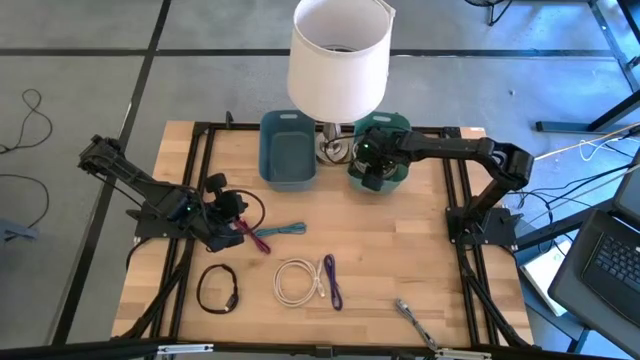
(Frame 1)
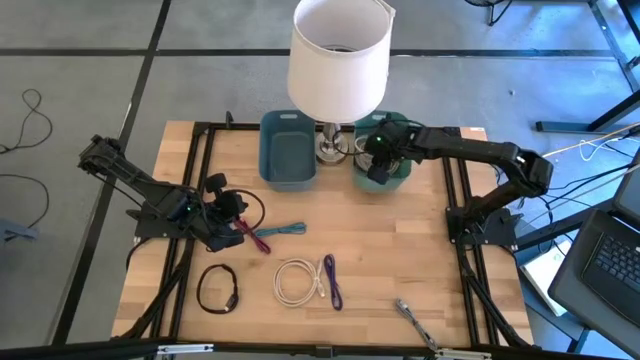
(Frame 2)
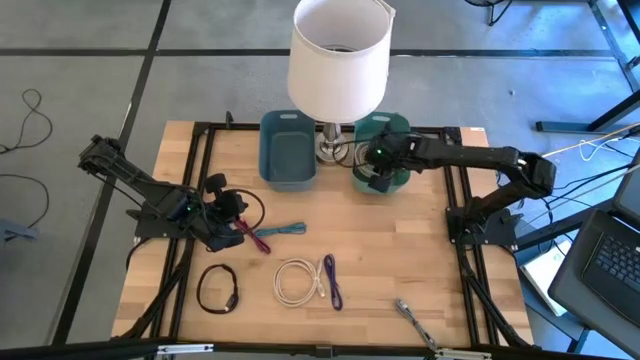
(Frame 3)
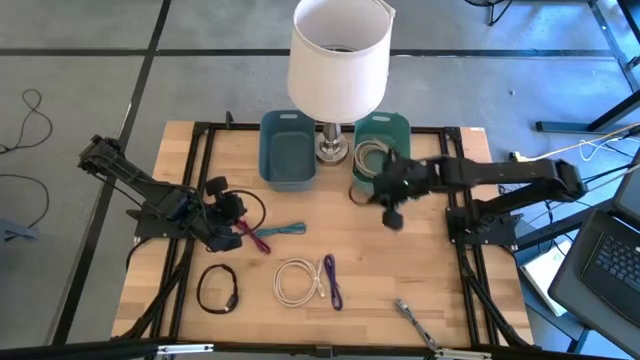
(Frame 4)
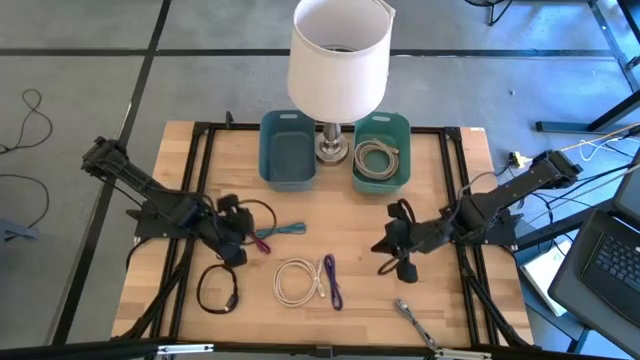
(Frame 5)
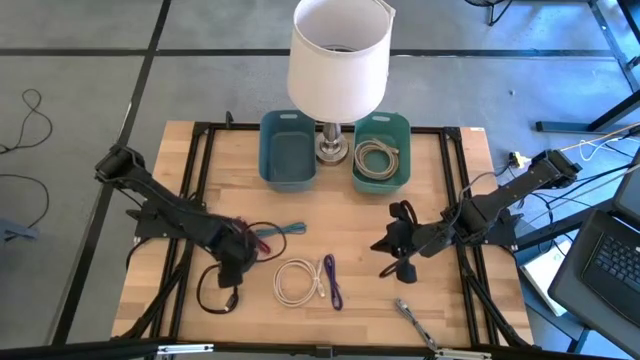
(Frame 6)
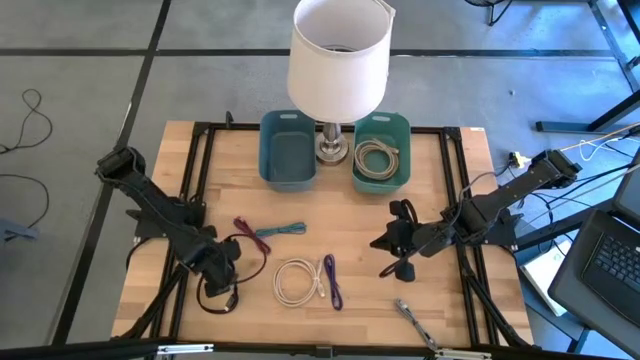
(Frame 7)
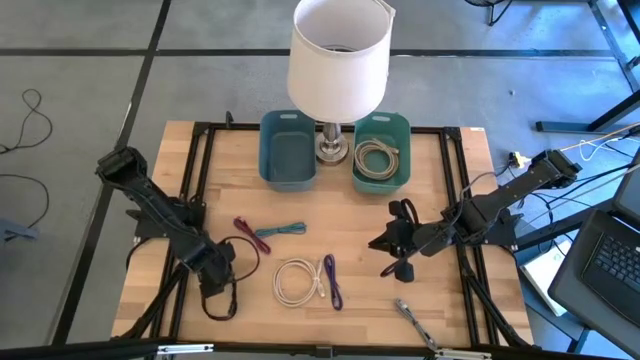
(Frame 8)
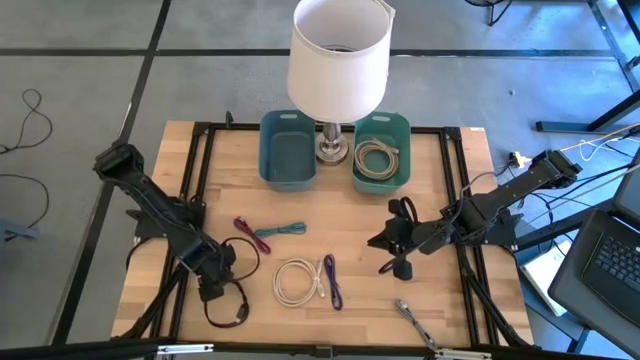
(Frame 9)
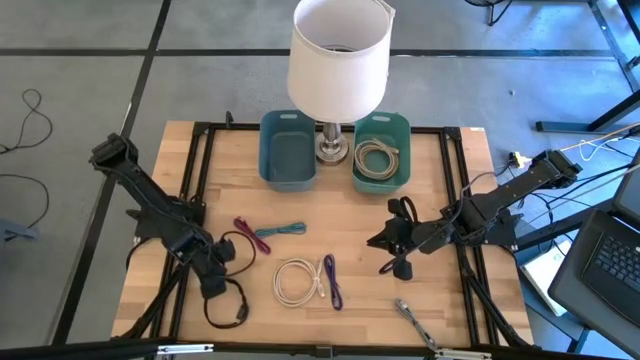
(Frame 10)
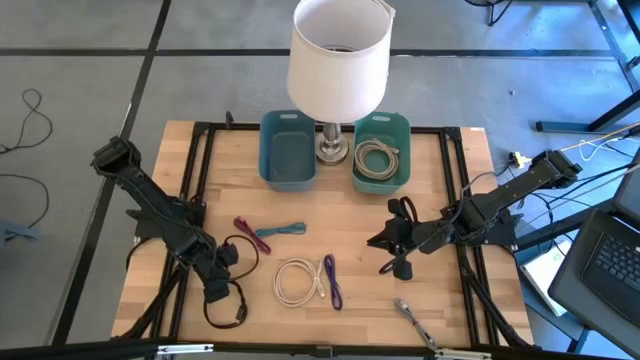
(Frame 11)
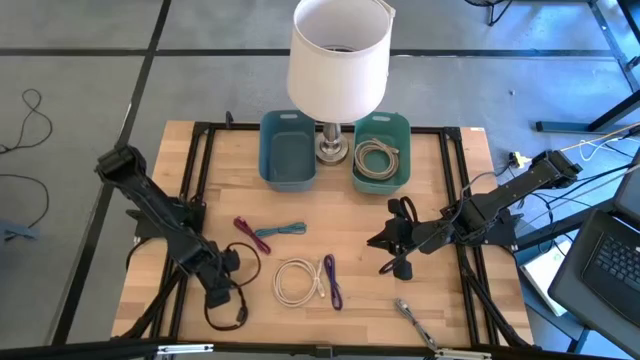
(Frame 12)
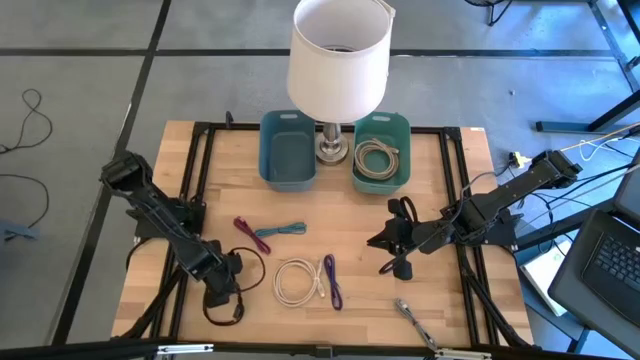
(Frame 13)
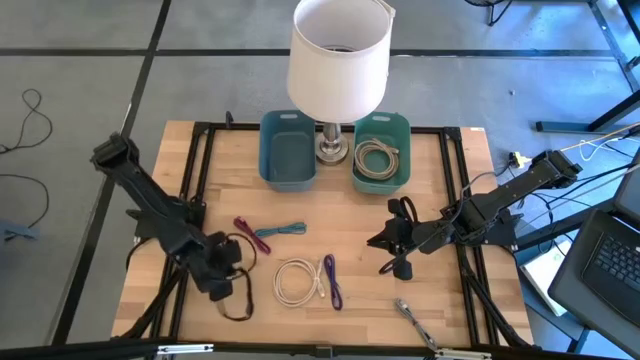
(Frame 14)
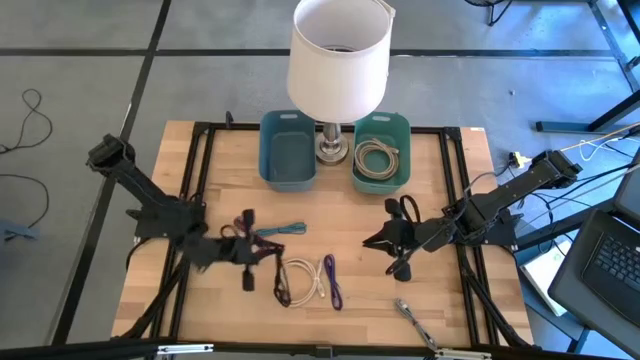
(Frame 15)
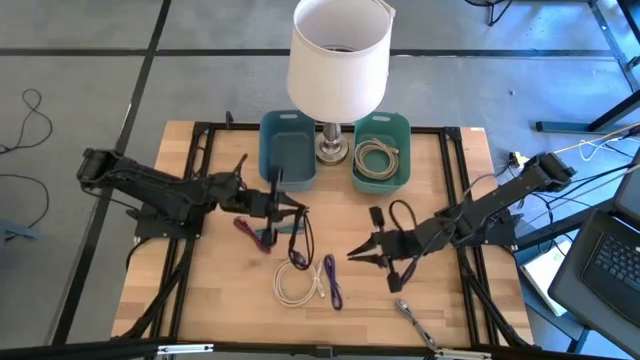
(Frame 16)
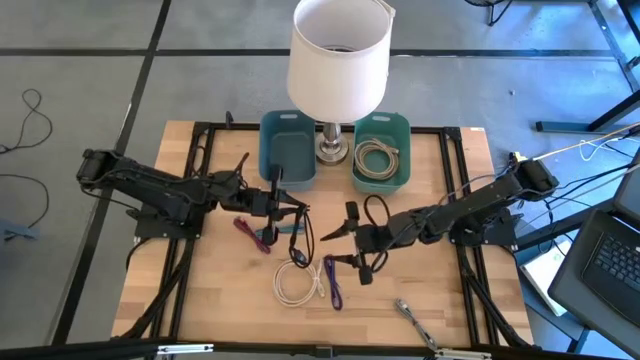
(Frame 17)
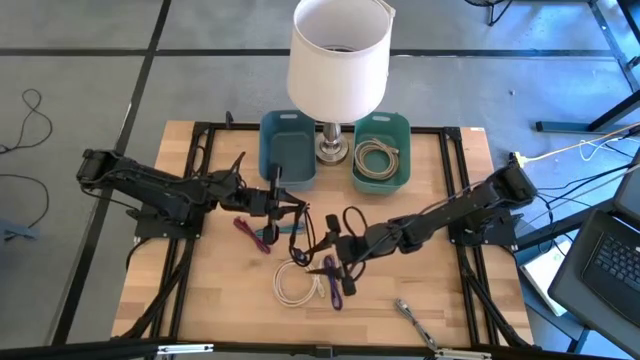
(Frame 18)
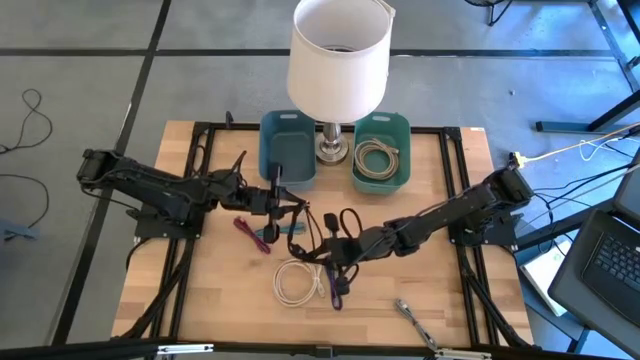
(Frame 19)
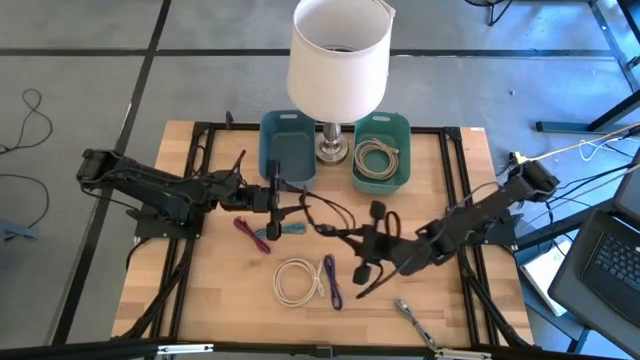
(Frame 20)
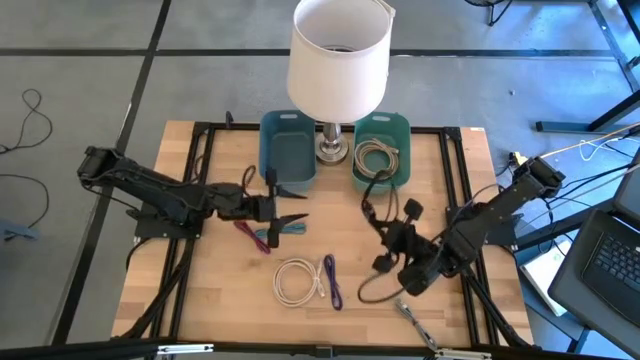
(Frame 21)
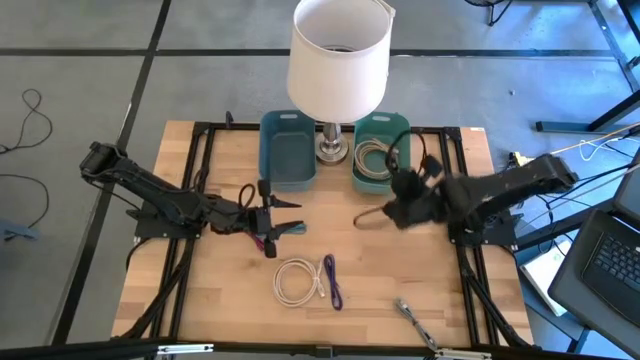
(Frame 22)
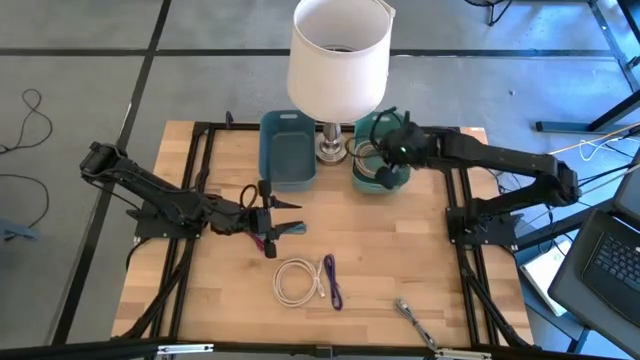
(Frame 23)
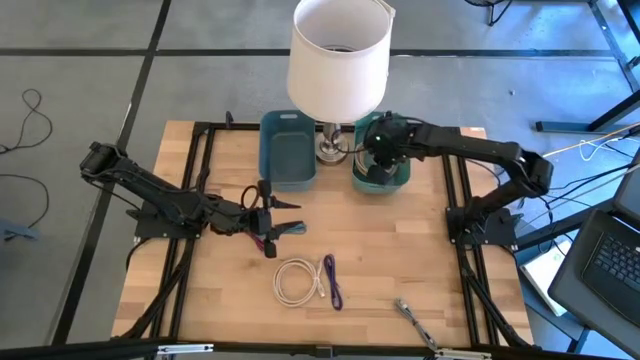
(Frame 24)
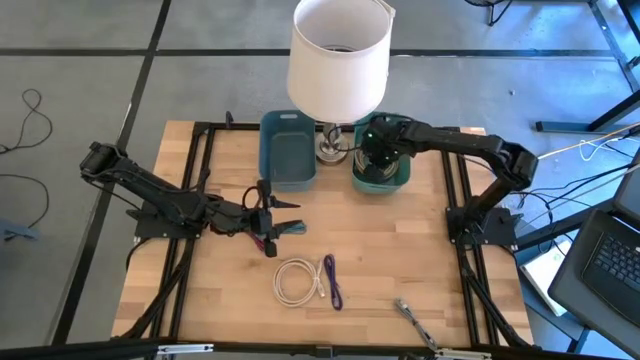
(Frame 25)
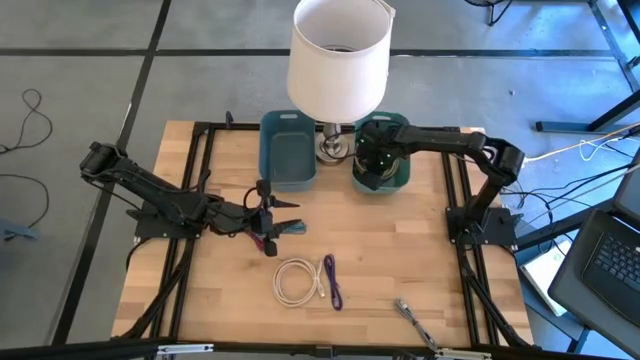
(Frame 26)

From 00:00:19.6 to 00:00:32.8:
Put the black hdmi cable into the green bin

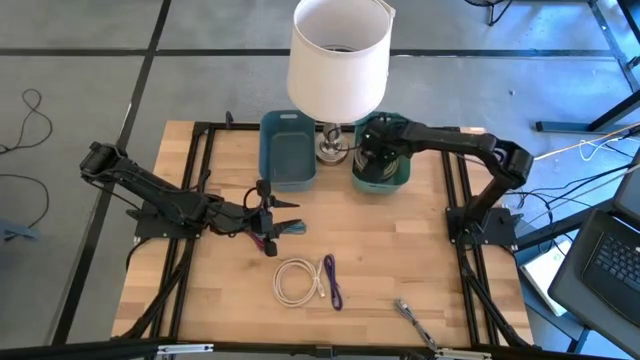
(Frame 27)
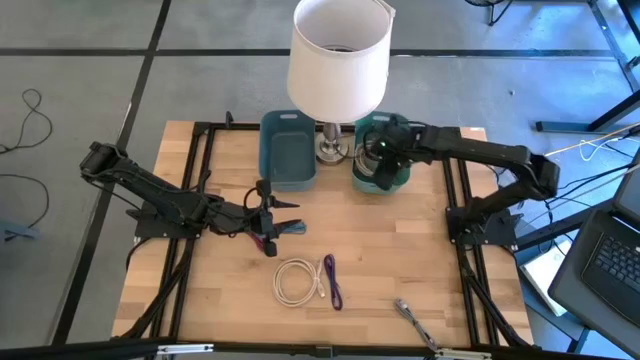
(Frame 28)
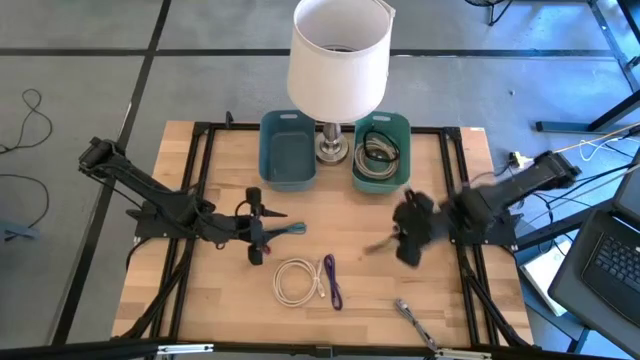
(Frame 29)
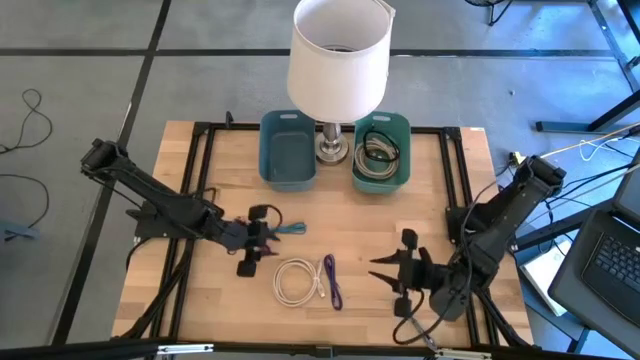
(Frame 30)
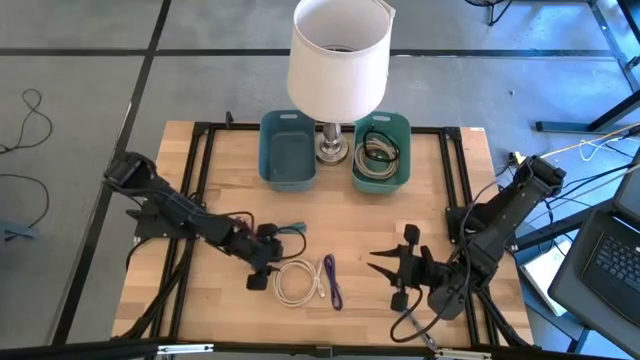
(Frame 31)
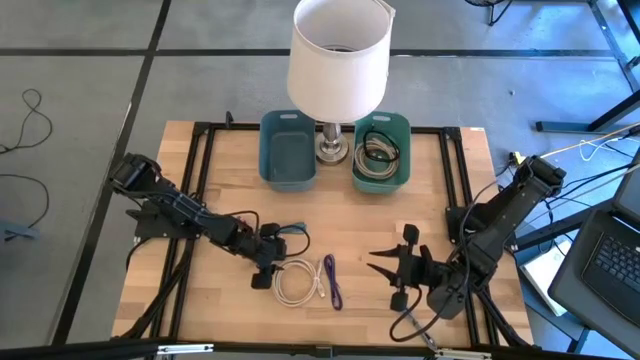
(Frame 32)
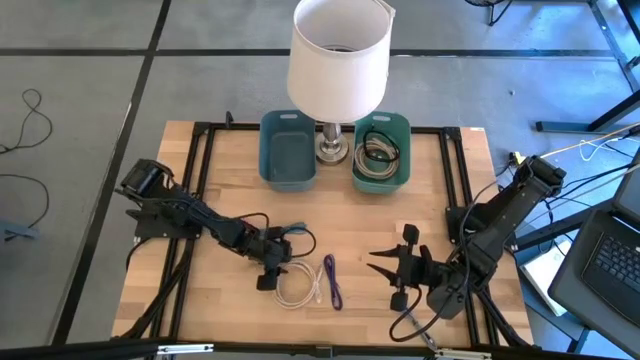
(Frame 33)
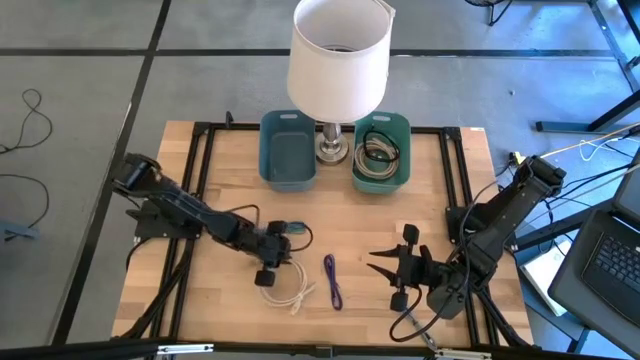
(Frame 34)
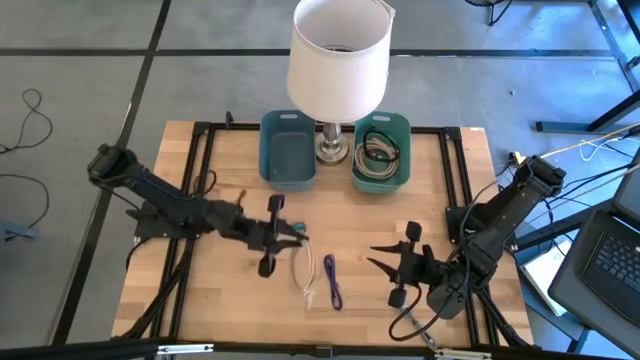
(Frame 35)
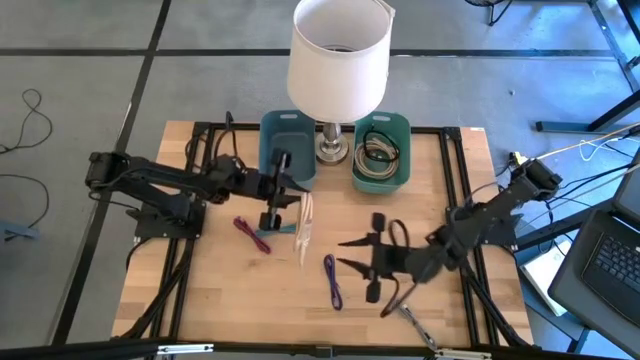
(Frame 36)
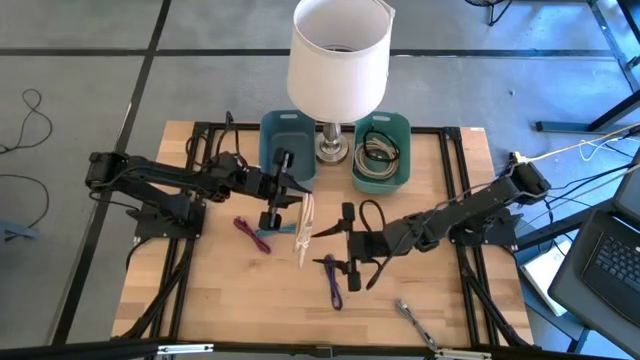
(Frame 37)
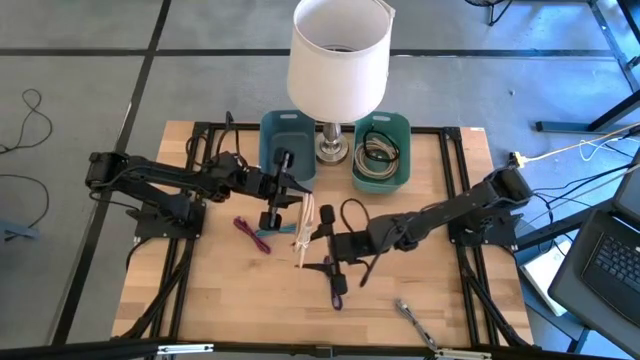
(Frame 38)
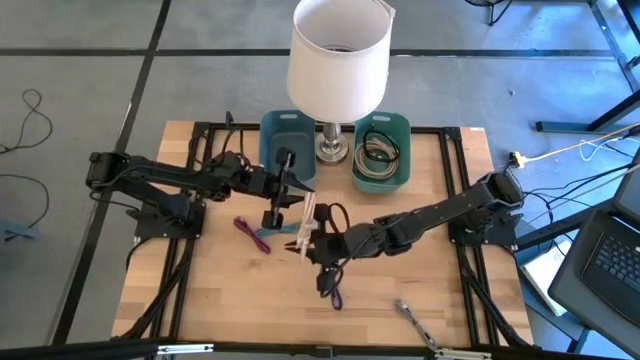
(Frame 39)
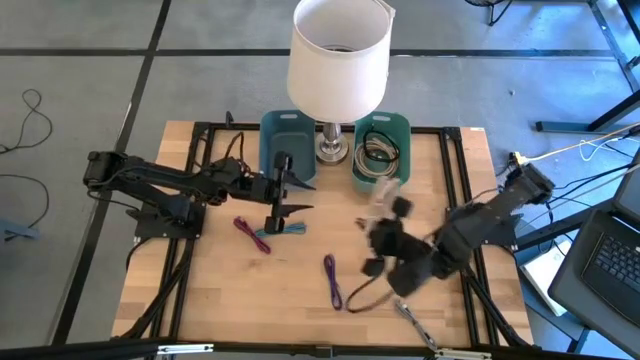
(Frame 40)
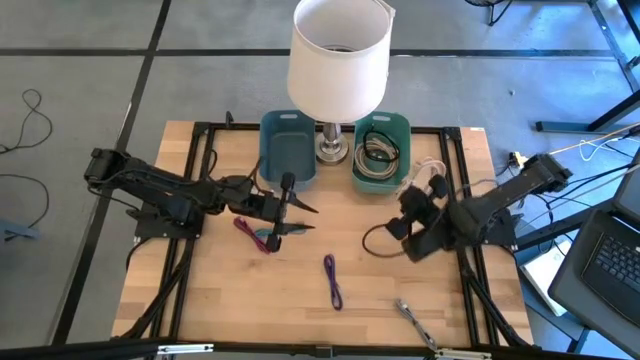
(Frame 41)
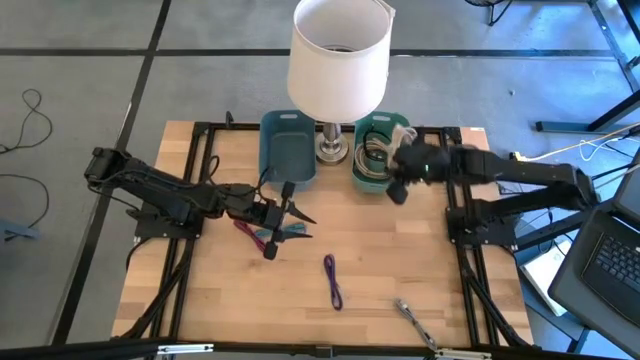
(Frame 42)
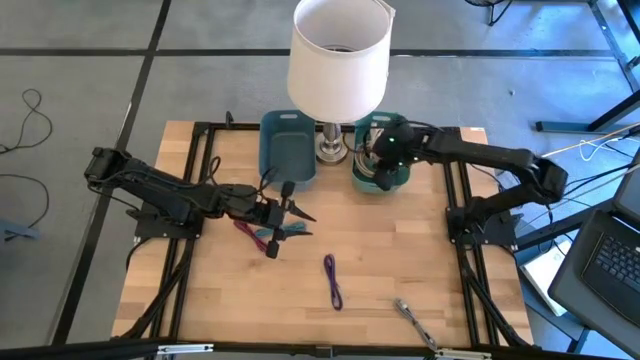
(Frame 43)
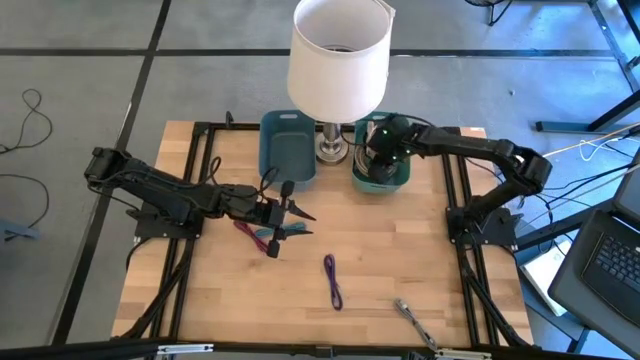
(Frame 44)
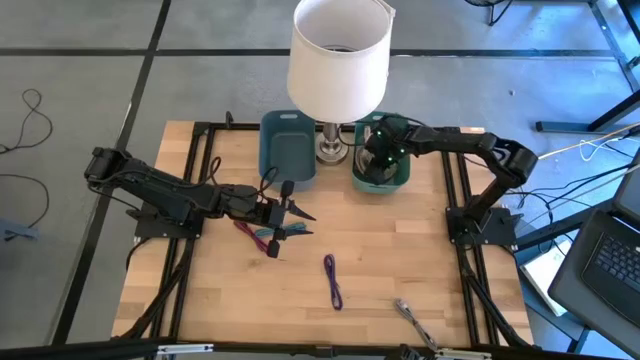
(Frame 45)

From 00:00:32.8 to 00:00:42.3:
Put the white hdmi cable into the green bin
